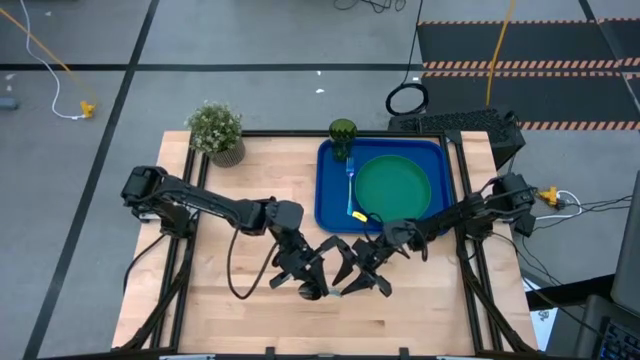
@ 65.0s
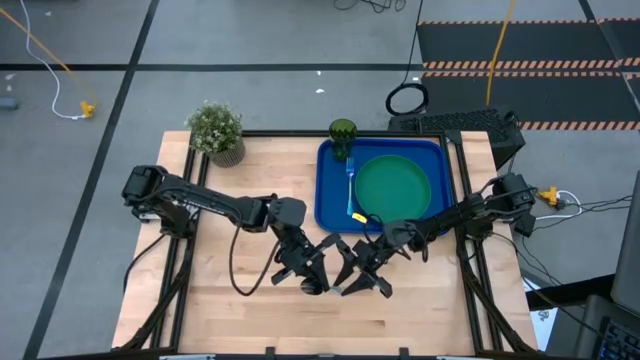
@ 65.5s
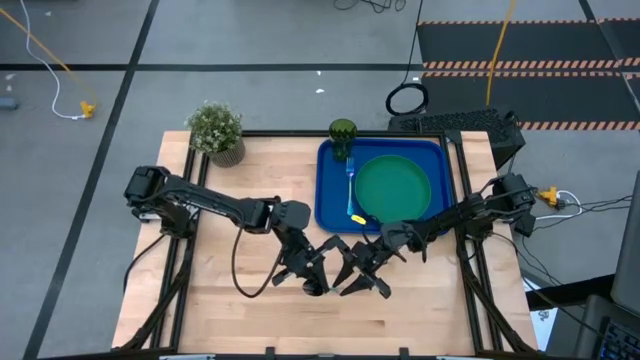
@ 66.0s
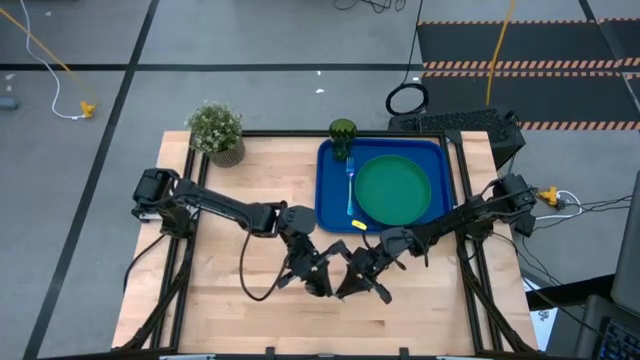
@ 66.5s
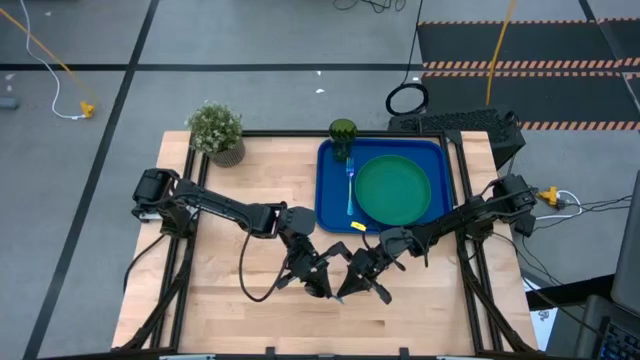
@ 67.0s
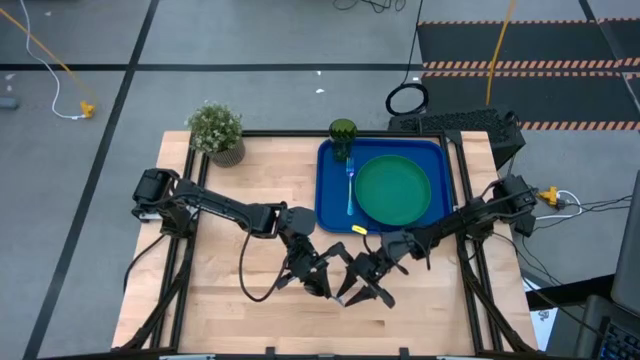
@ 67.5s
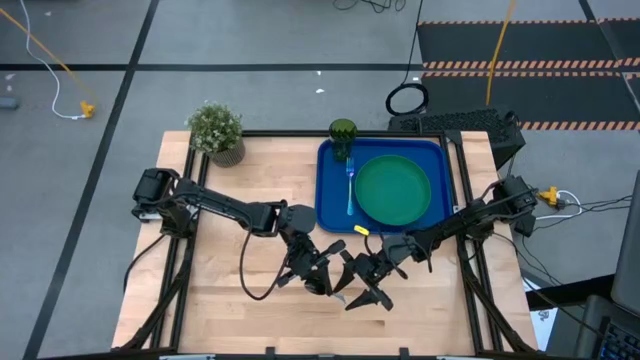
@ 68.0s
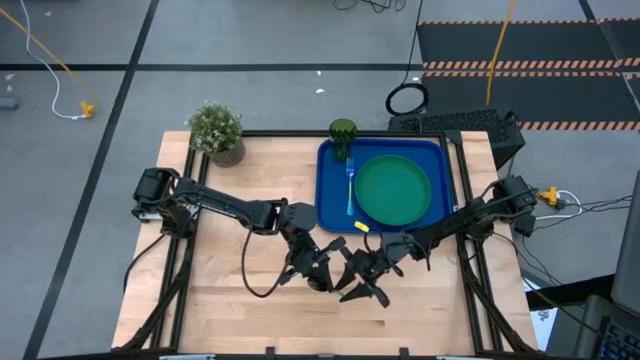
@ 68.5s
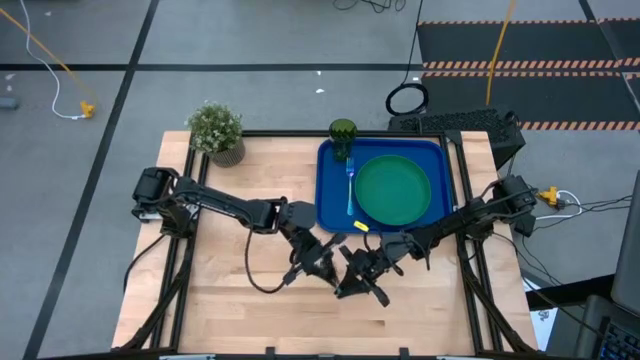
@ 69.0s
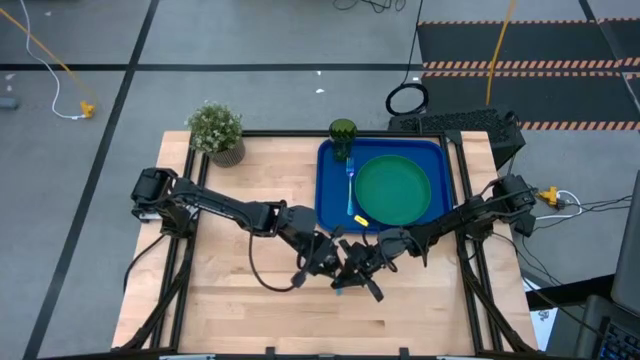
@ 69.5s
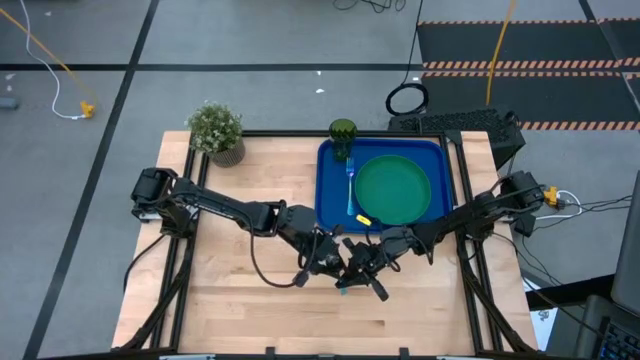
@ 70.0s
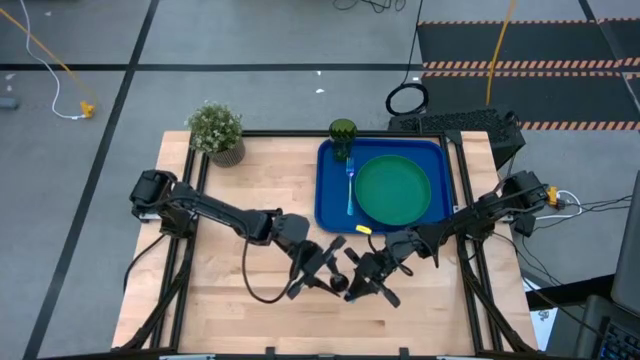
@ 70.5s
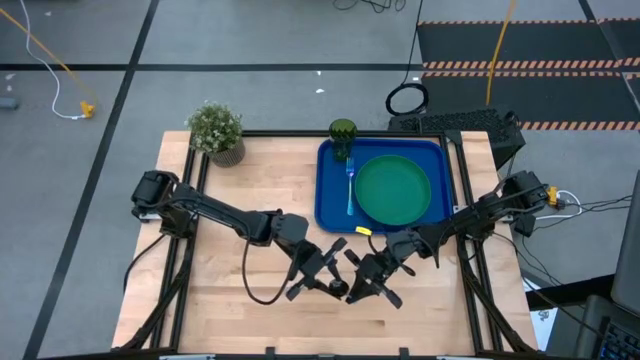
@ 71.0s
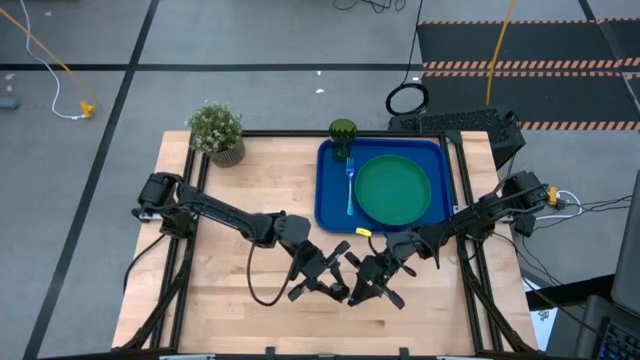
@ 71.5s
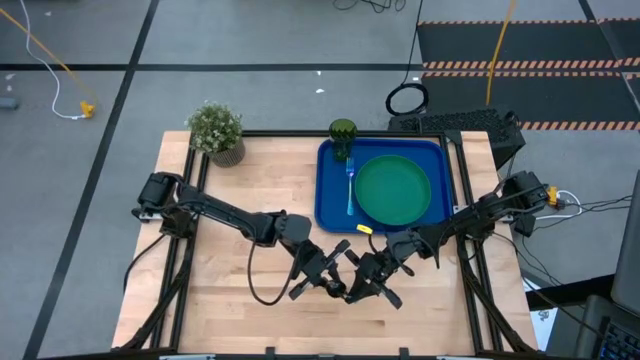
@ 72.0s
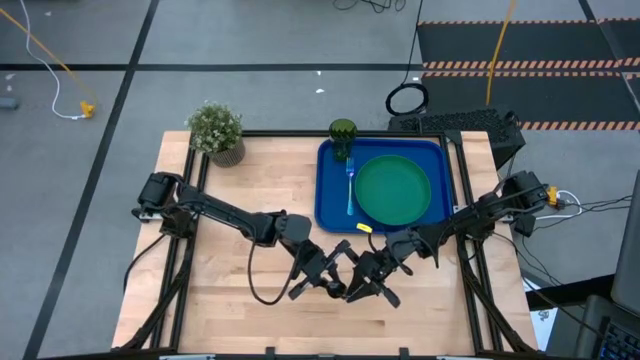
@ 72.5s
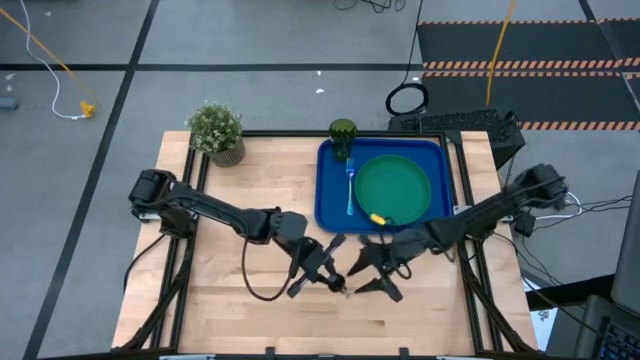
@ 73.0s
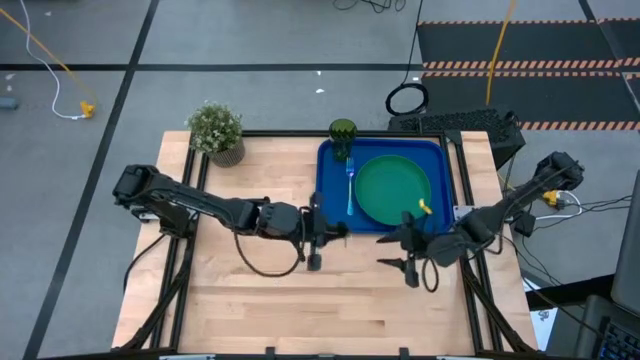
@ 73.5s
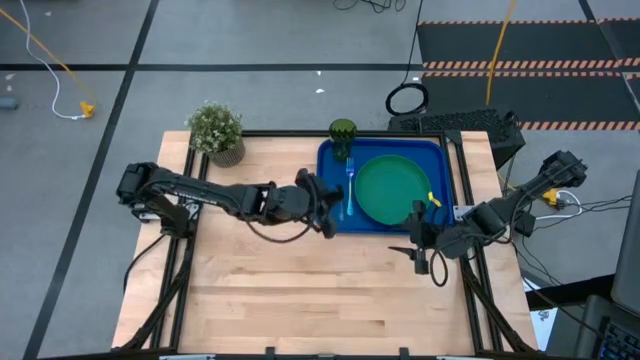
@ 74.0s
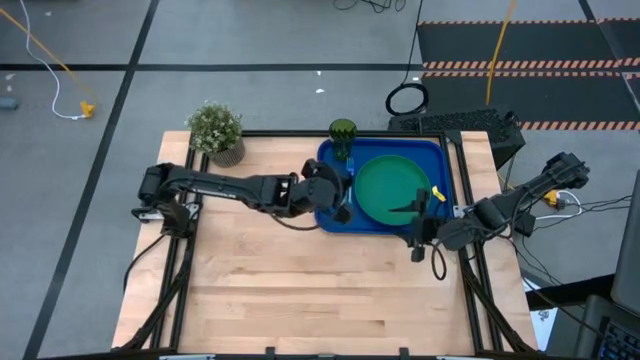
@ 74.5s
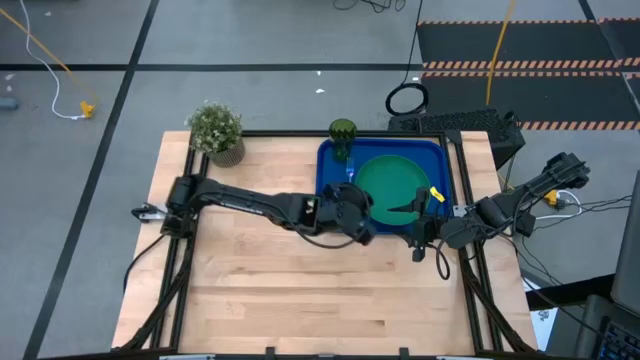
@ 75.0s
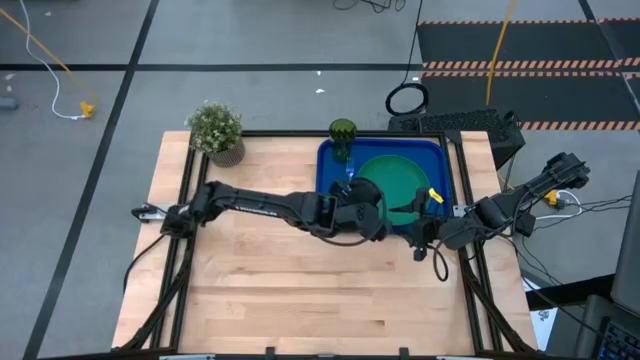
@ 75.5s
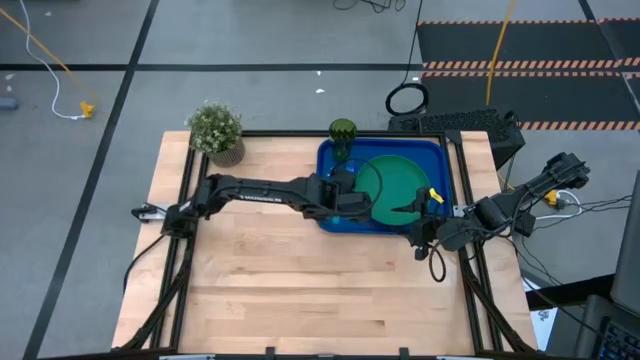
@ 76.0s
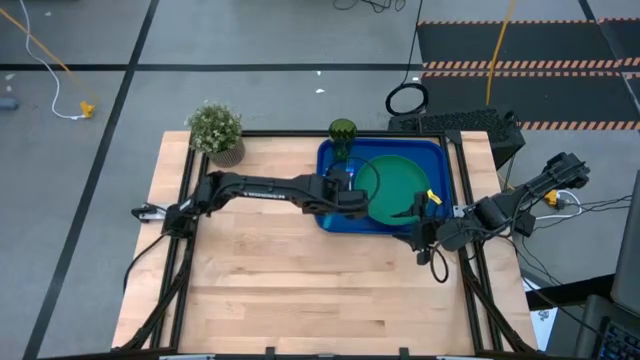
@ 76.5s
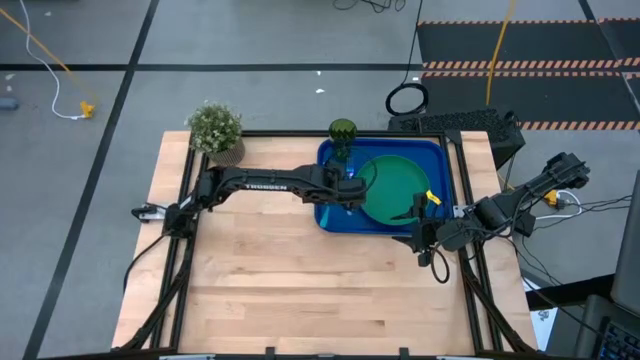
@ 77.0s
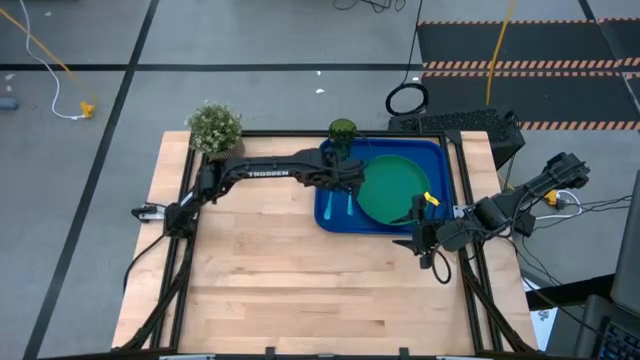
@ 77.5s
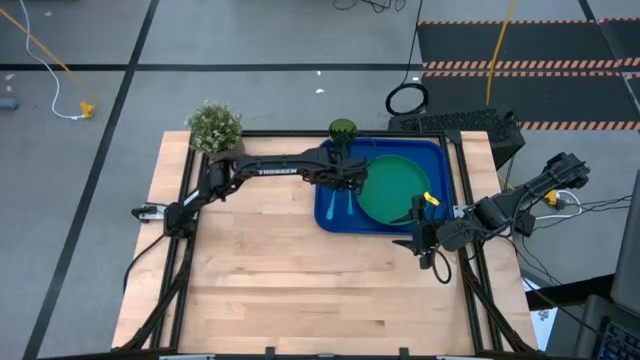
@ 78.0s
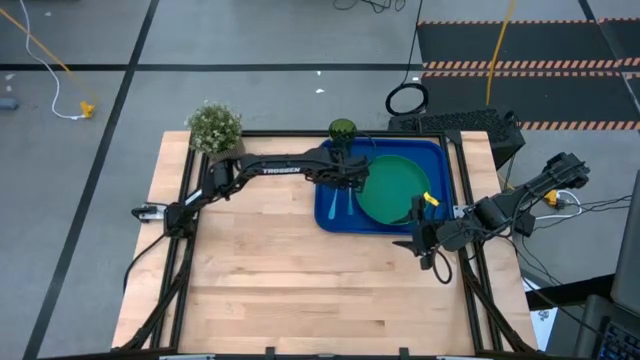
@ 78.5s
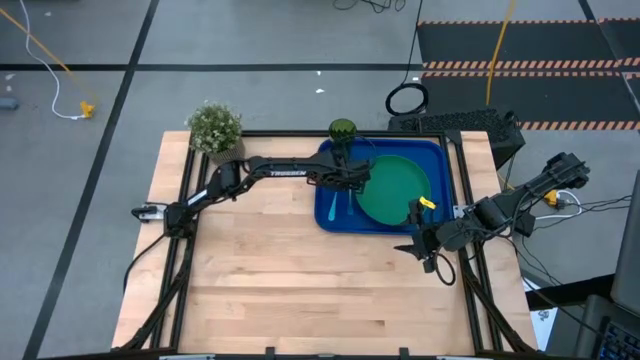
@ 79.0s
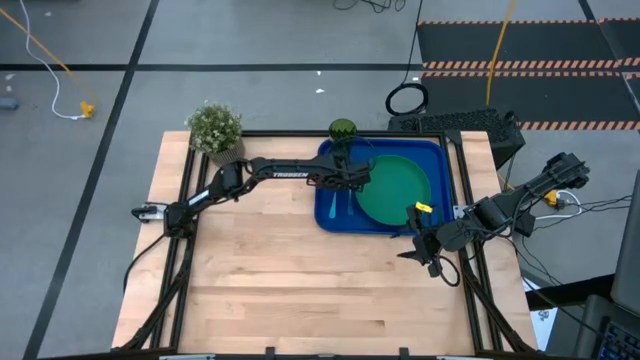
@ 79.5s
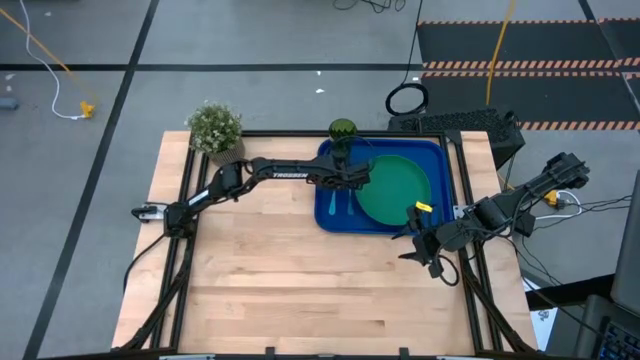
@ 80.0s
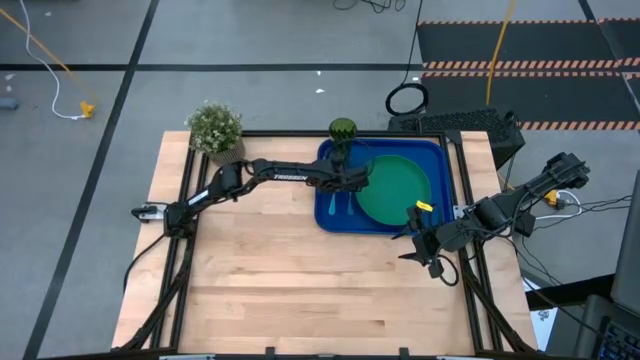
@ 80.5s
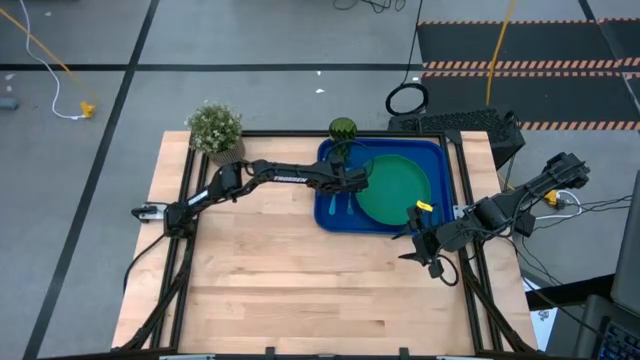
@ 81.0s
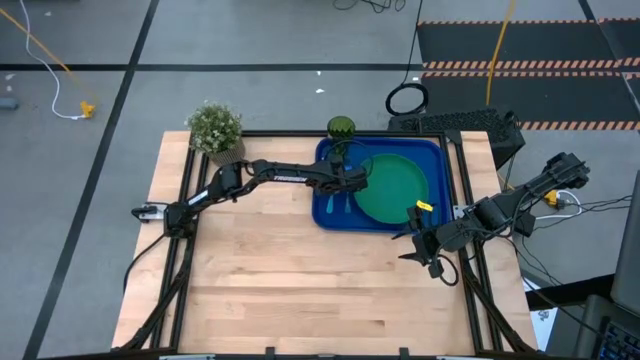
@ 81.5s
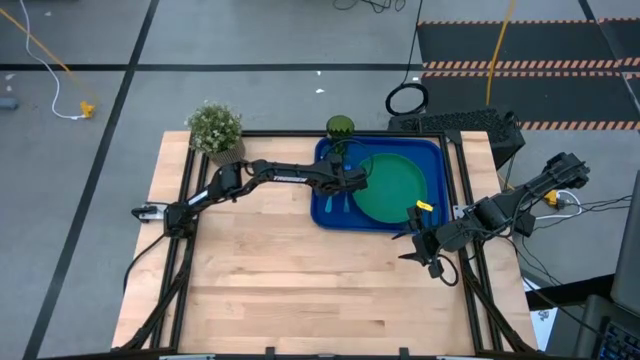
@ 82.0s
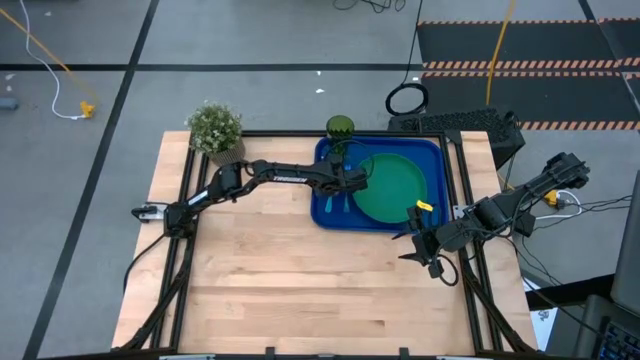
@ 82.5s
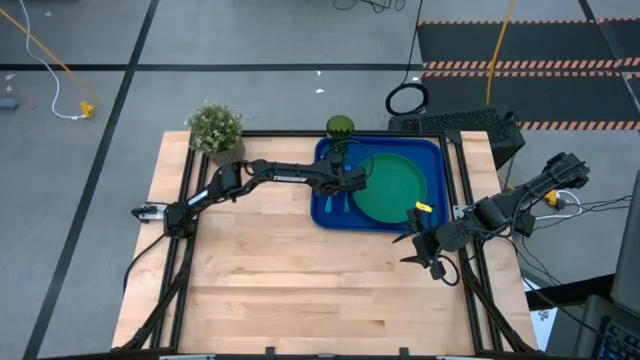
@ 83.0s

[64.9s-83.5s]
Task: Pick and place plate/cup/fork/spoon on tray
Put the blue spoon on the blue serving tray to the left of the blue fork

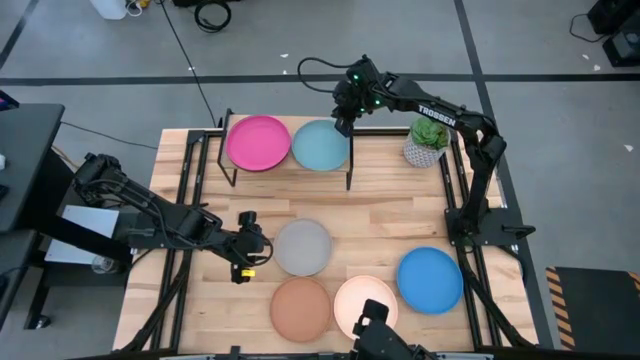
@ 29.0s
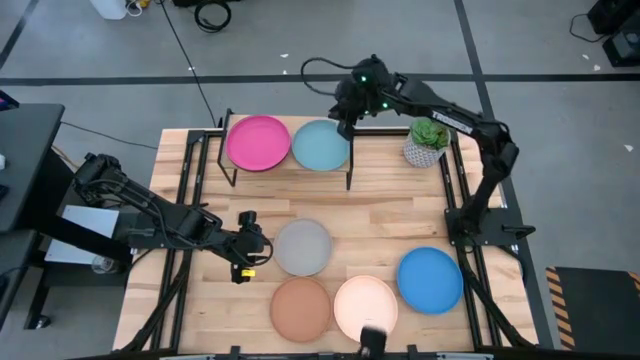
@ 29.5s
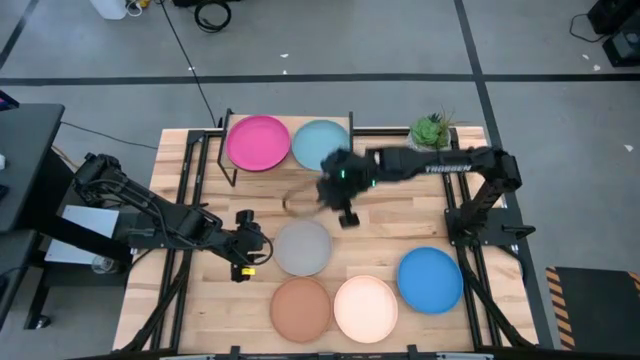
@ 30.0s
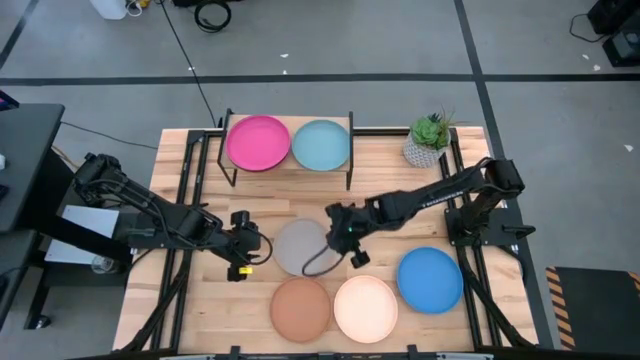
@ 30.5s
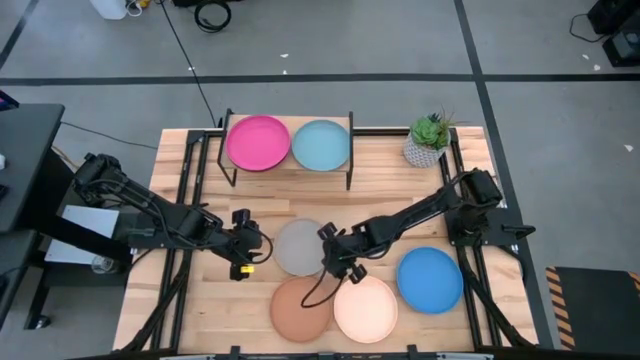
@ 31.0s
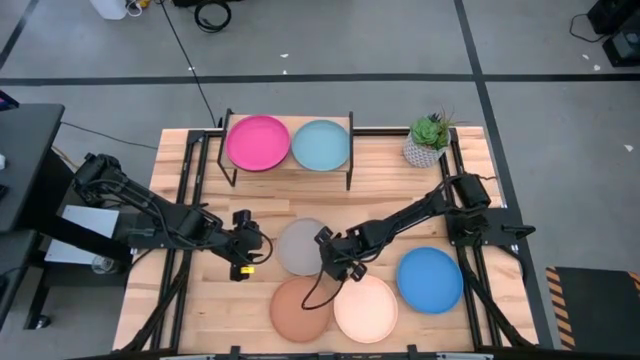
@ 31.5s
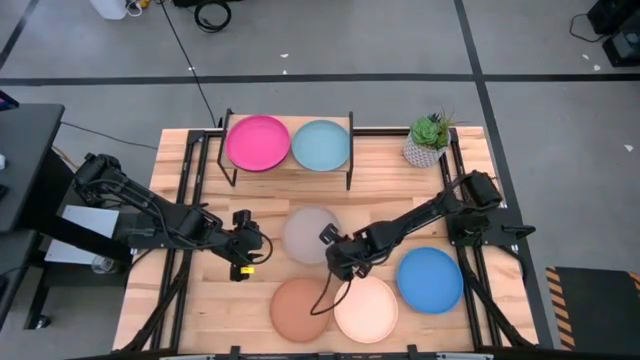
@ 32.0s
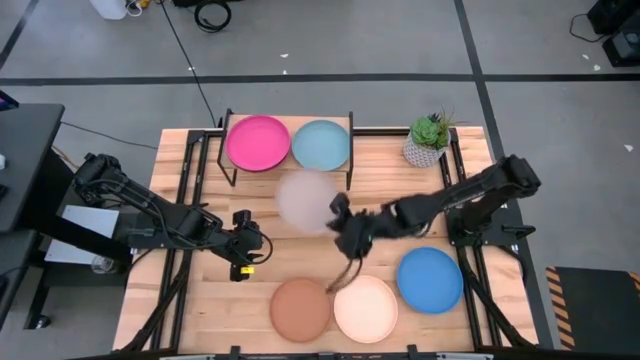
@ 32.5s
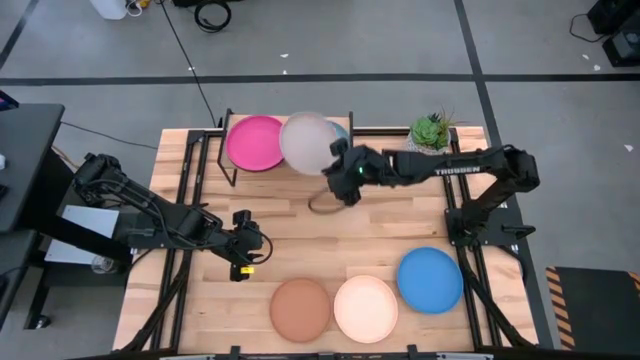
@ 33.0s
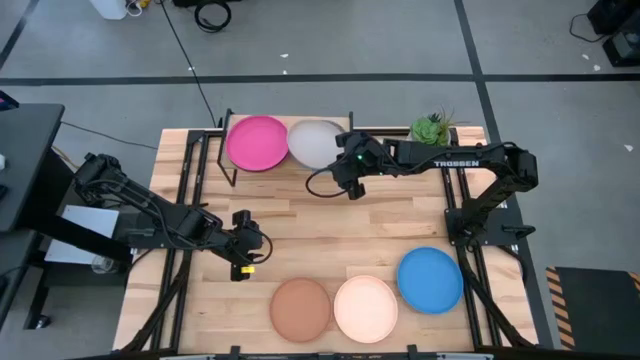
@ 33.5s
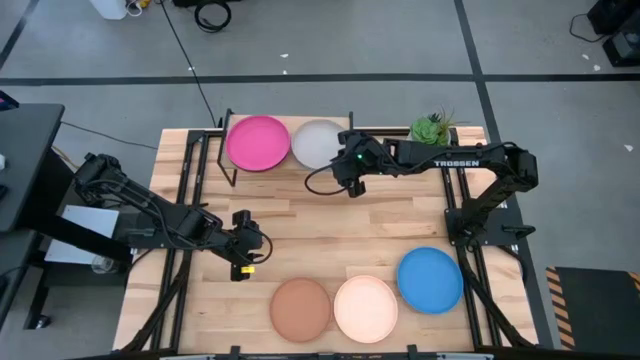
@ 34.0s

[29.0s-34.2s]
Task: Place and stack plates onto a shelf
Stack the gray plate on the top of the light blue plate
